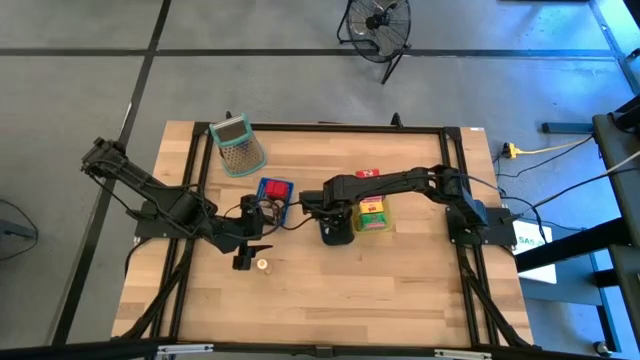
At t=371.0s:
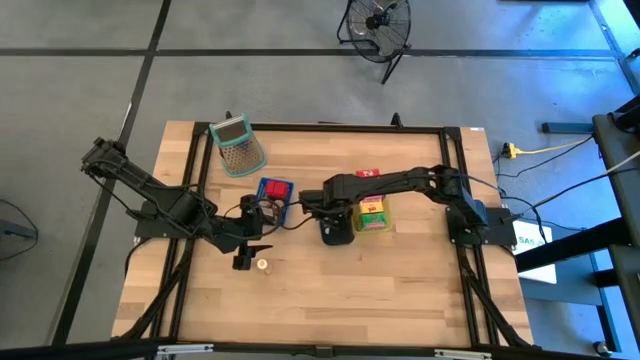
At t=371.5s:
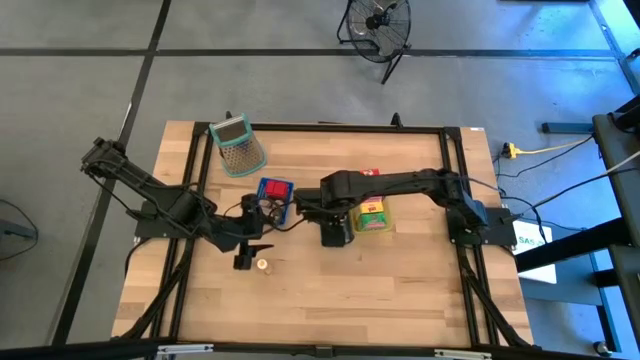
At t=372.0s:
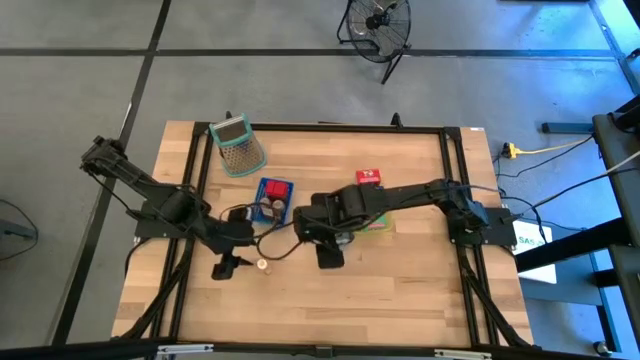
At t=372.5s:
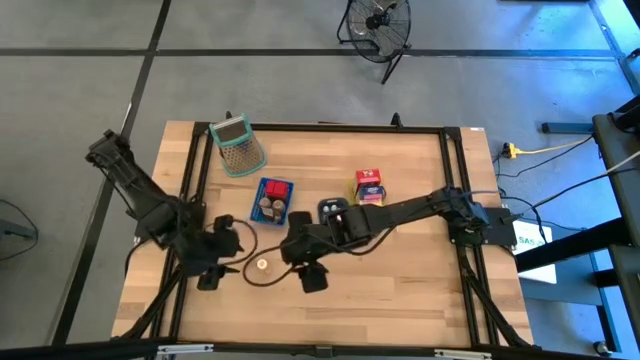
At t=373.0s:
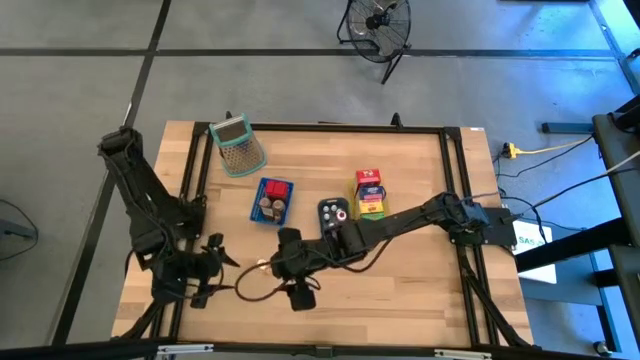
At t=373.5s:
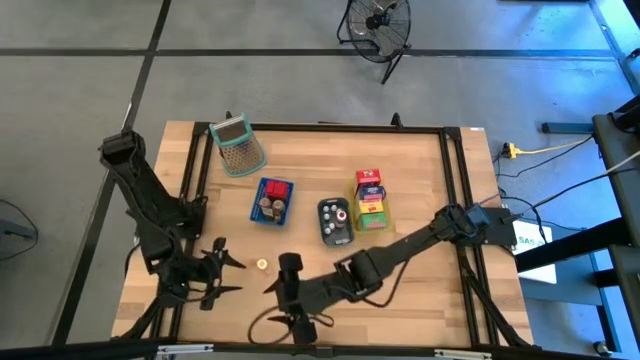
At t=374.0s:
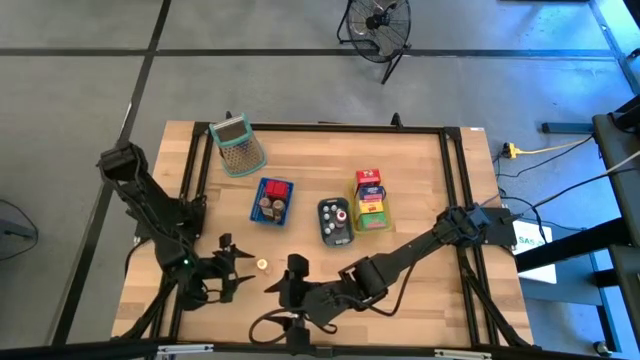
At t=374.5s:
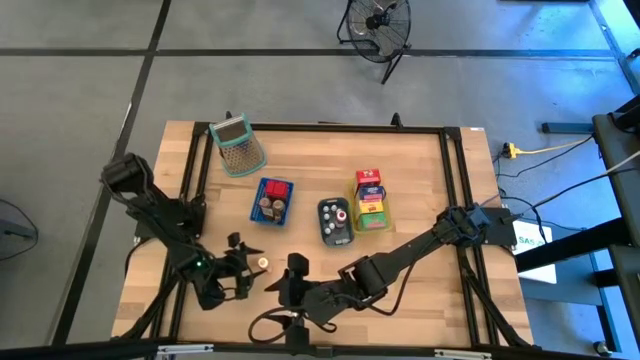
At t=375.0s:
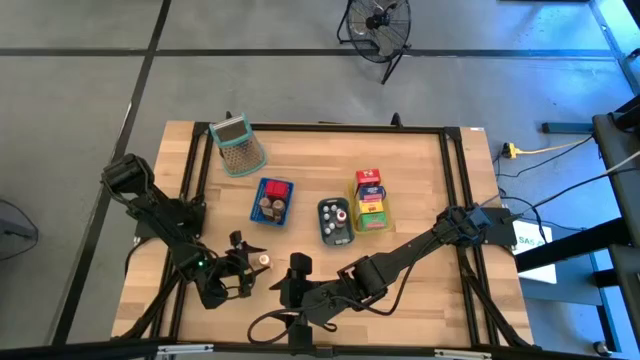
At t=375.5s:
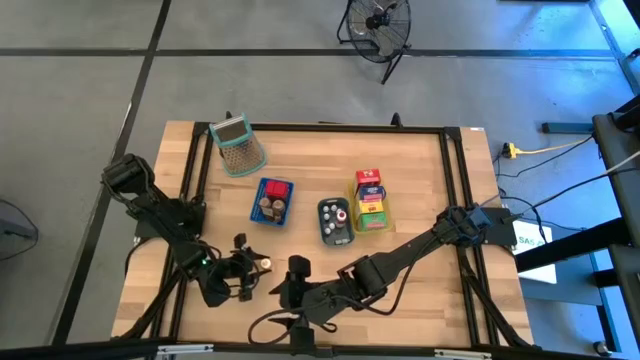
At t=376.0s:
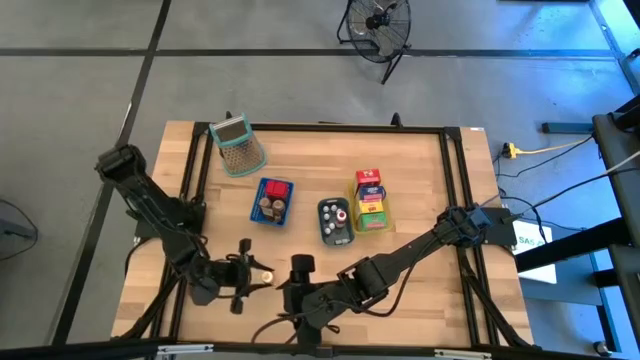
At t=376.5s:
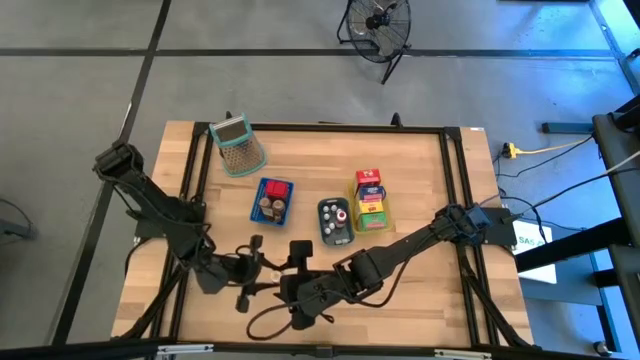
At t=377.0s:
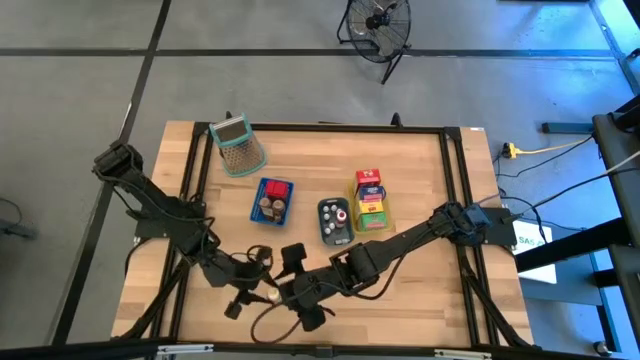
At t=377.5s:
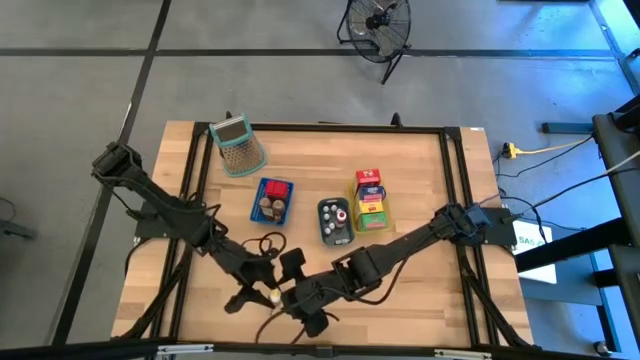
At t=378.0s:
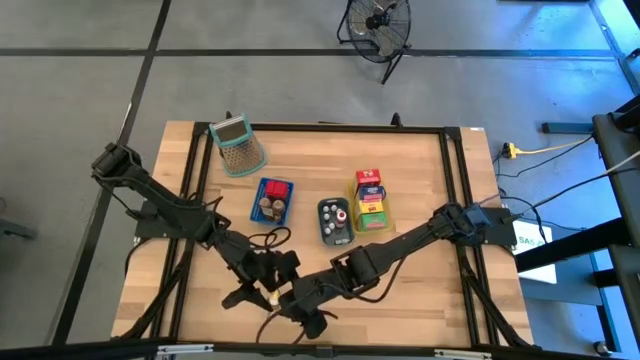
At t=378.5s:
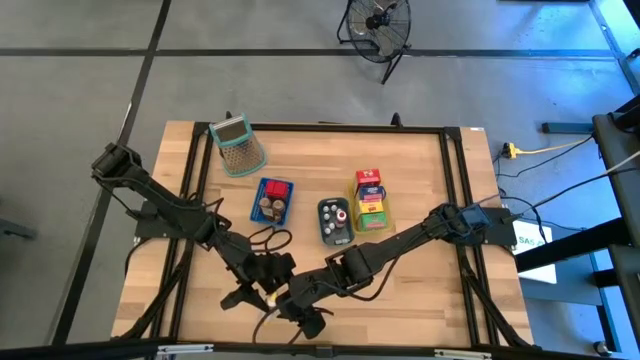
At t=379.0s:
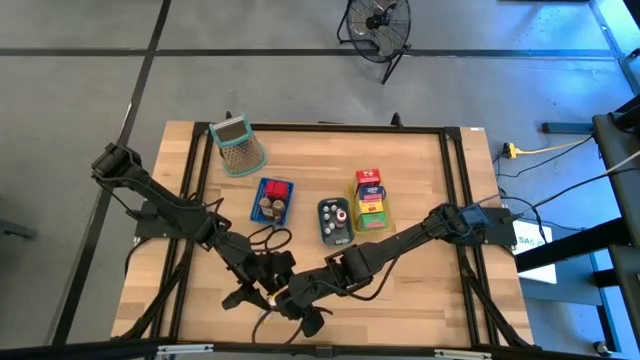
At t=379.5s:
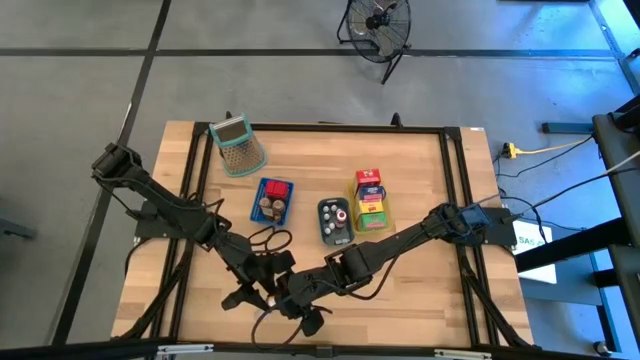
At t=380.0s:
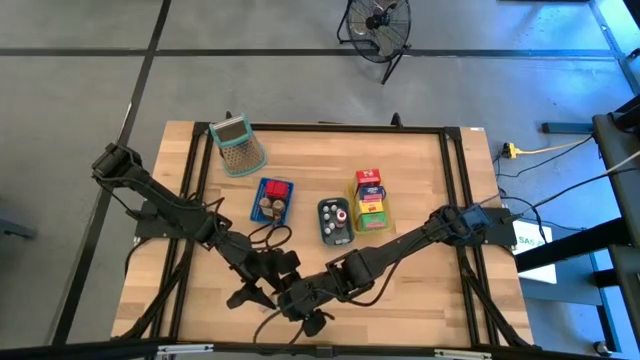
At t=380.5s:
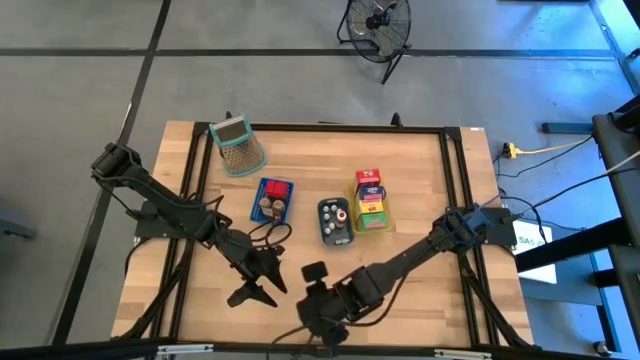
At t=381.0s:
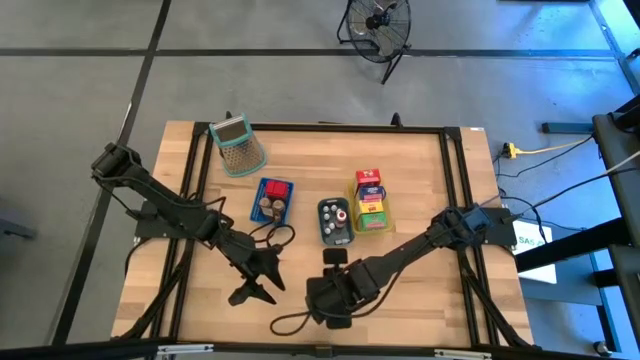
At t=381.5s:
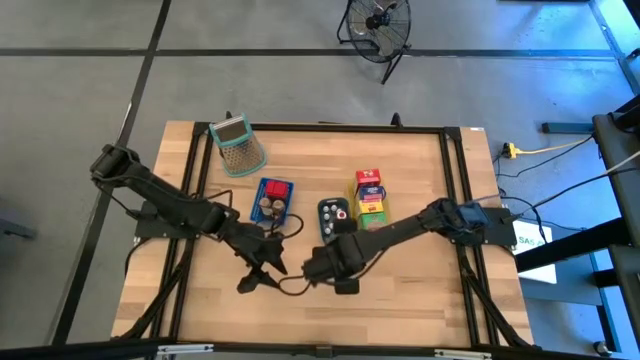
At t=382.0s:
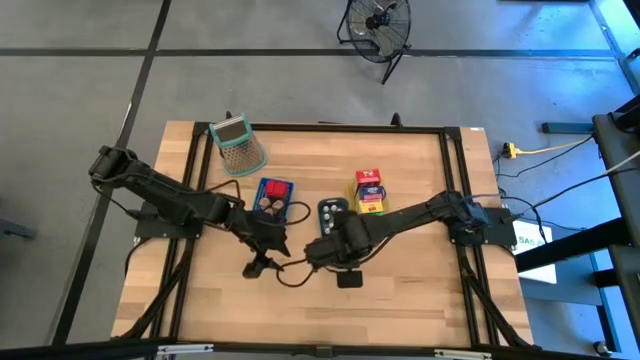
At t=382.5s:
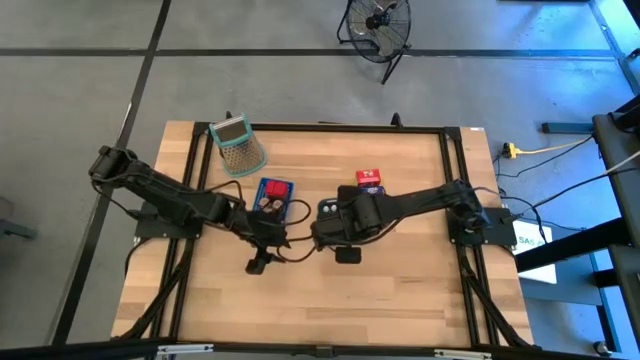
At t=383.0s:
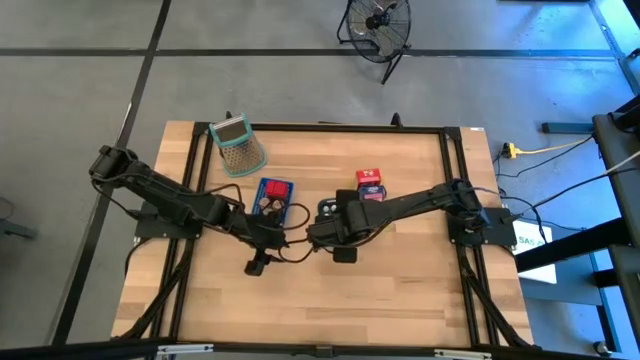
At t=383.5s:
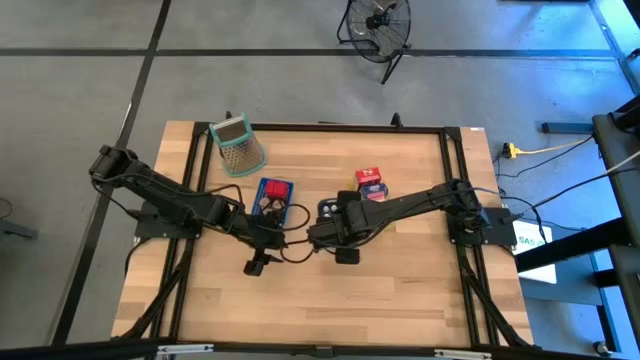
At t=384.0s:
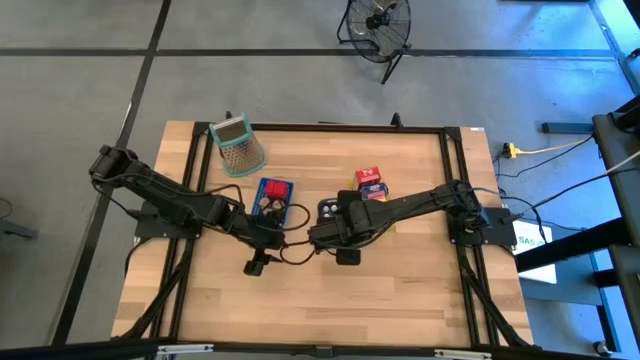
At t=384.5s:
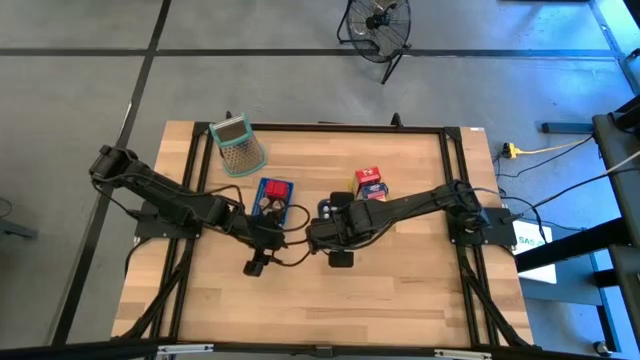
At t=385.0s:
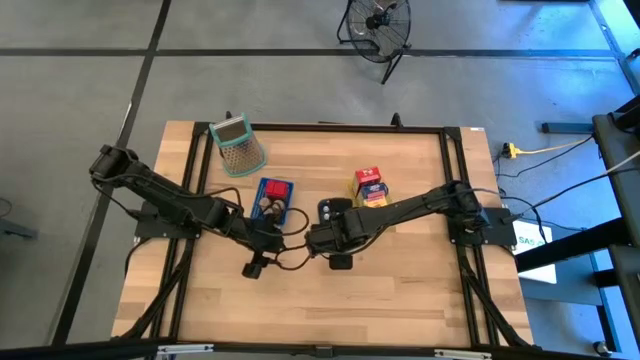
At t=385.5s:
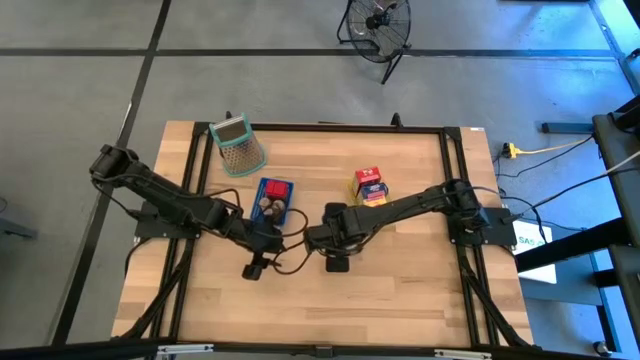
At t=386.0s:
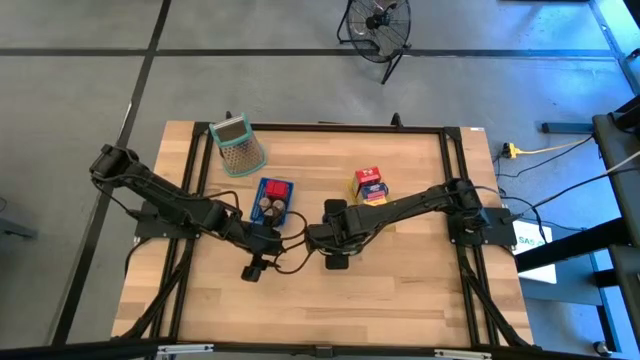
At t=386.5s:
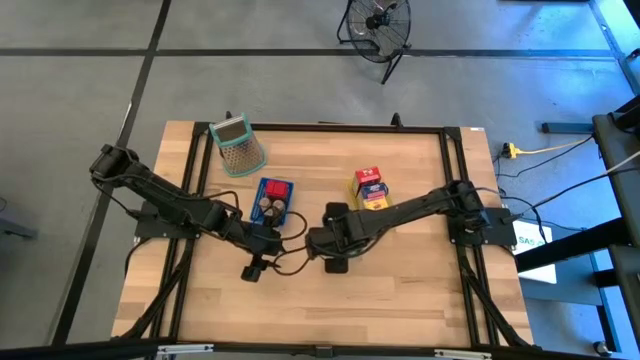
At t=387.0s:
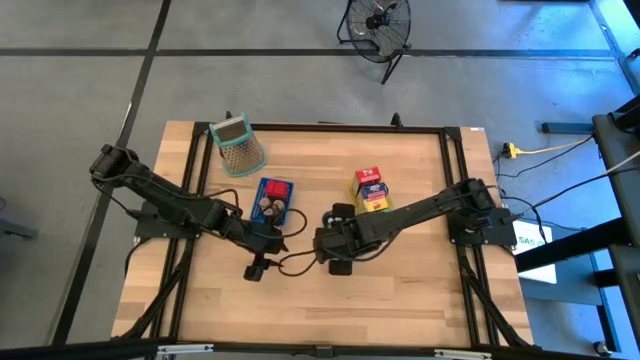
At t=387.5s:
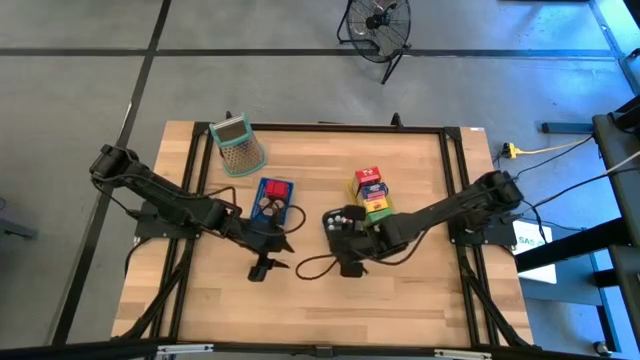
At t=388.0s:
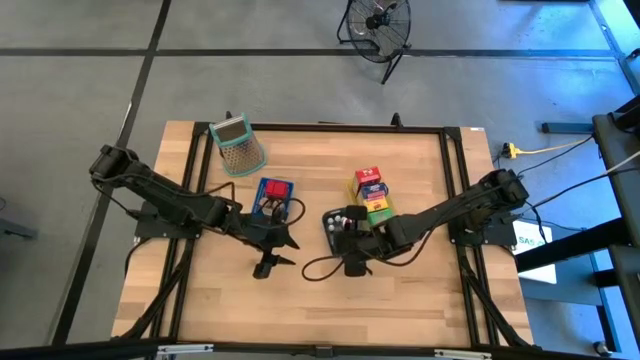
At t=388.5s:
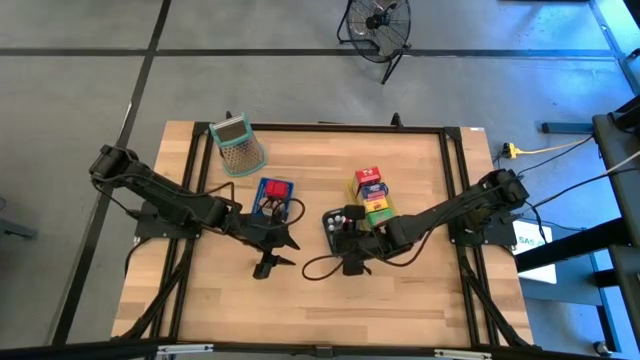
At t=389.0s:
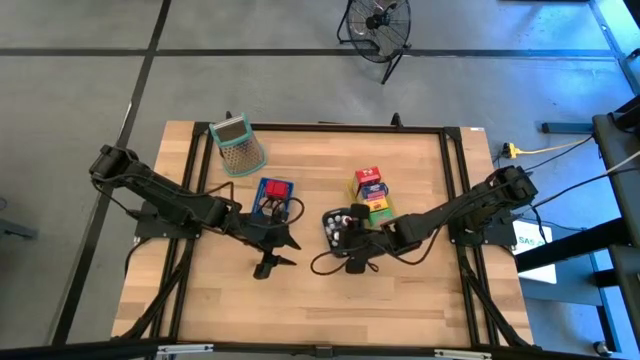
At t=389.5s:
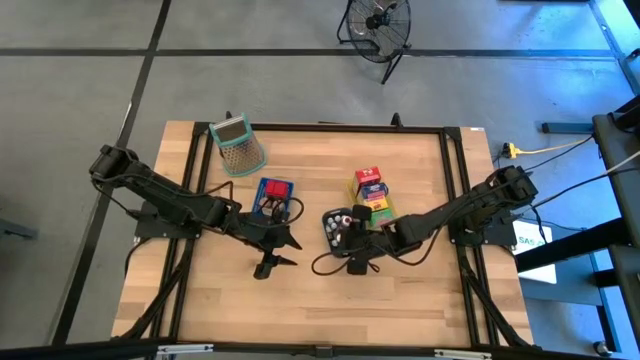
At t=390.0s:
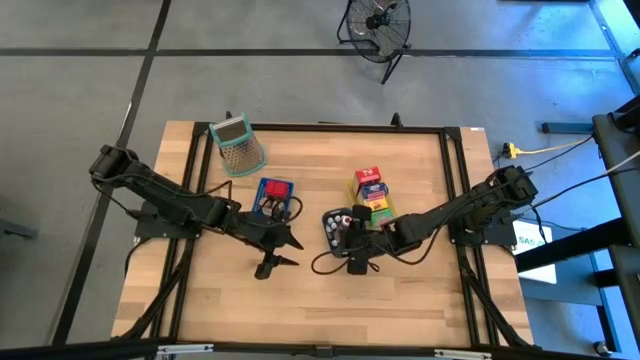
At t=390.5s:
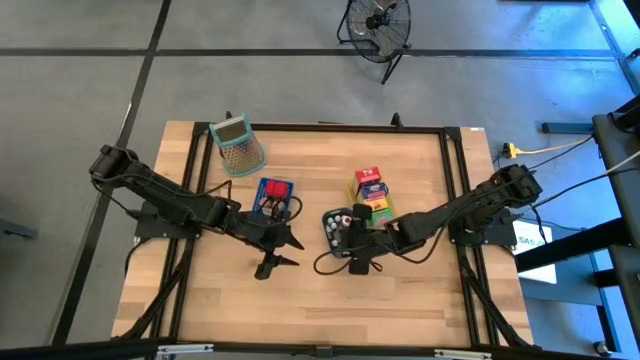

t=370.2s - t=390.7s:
Task: Pick & Place Kitchen Items
Put the large yellow food coloring into the green bin

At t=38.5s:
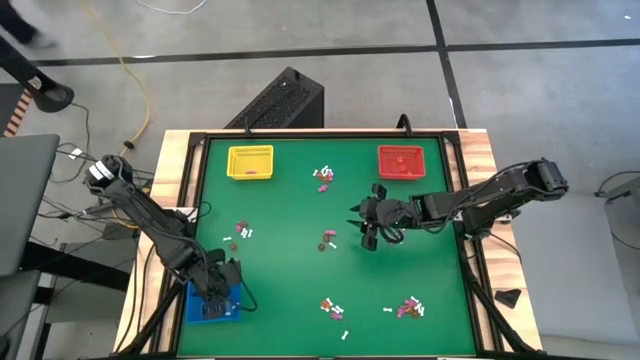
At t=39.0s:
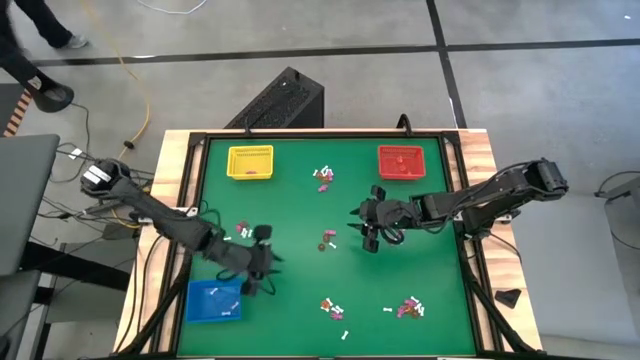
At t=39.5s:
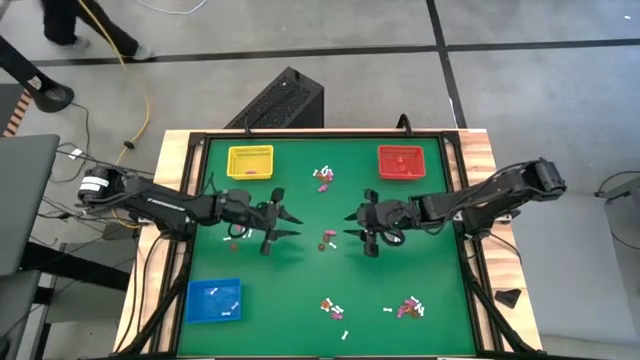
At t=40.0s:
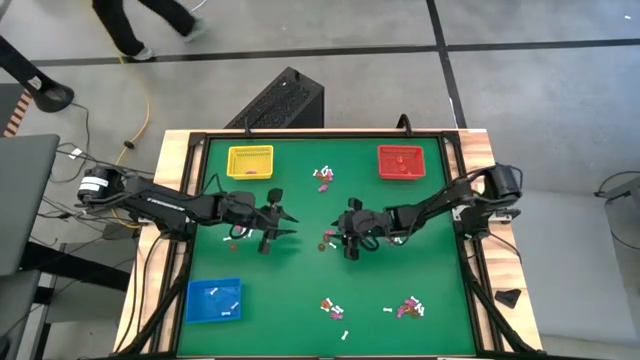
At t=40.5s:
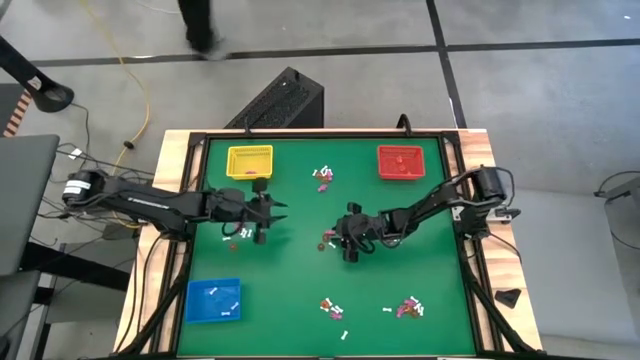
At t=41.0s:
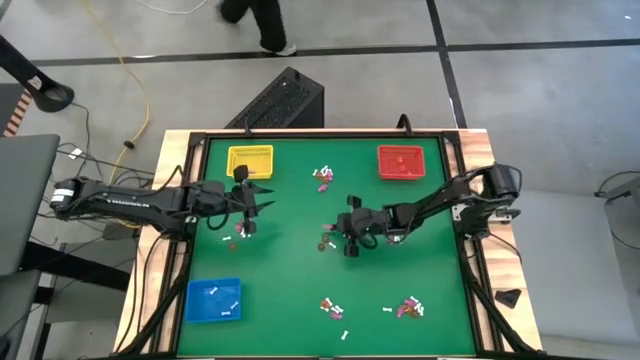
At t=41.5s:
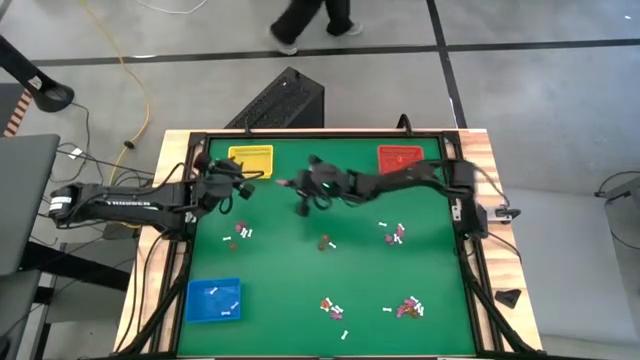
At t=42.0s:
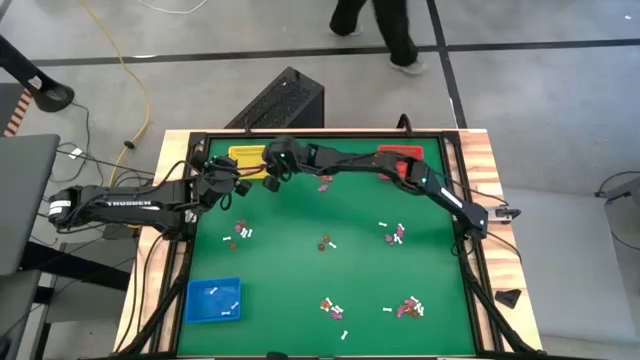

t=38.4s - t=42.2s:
Task: Sort Halloween decoration
Put the pink skeleton toy into the yellow bin
